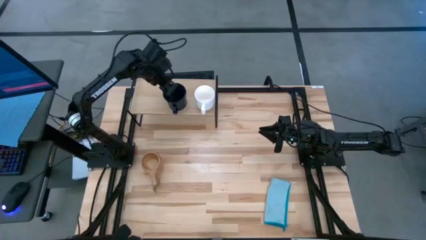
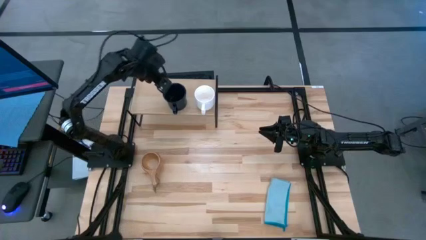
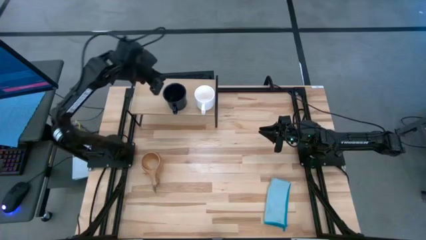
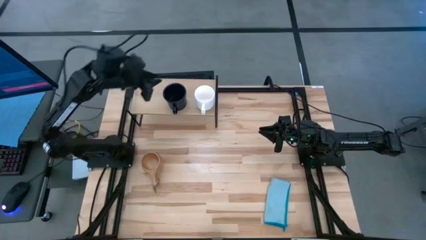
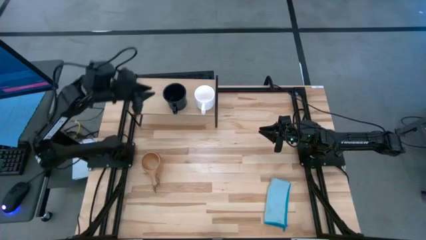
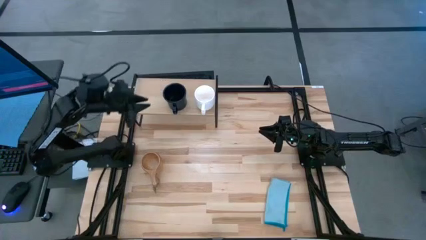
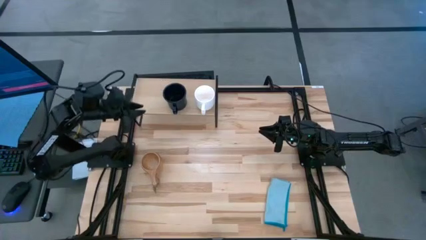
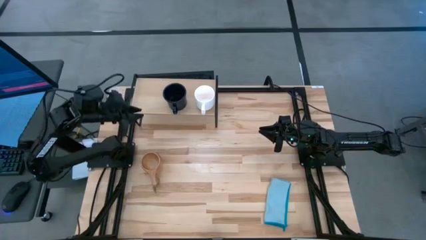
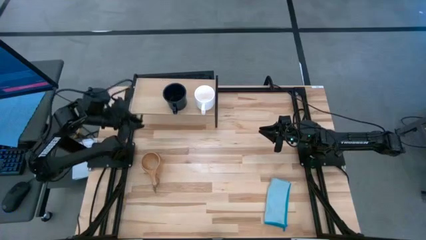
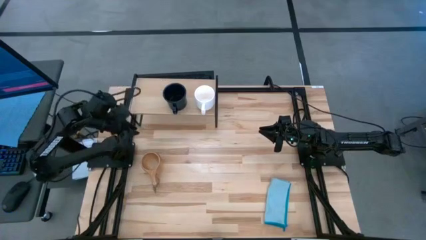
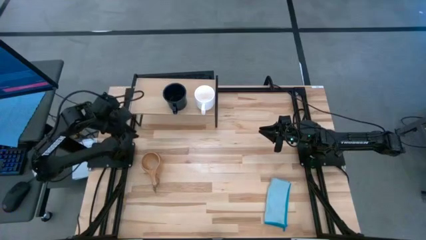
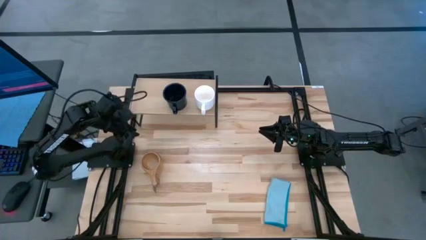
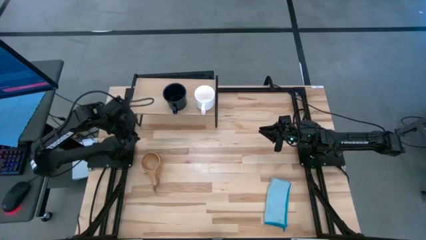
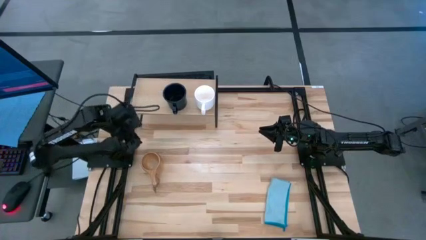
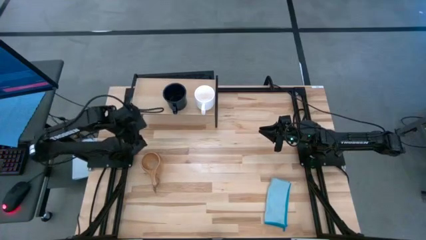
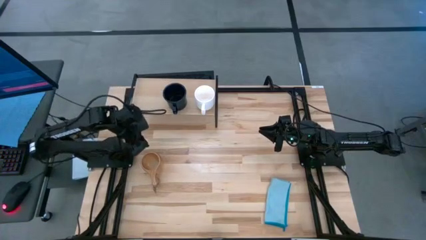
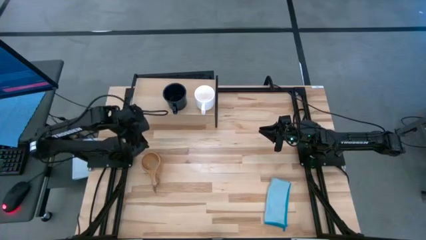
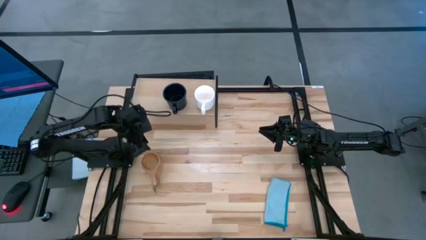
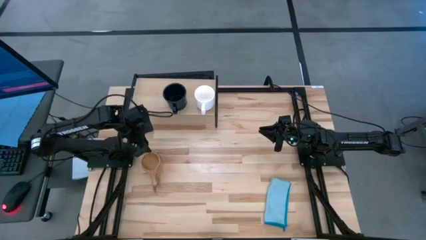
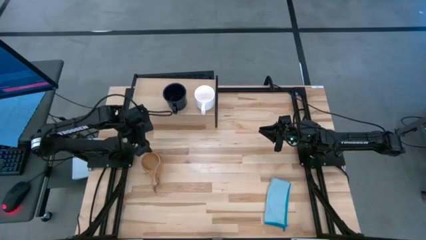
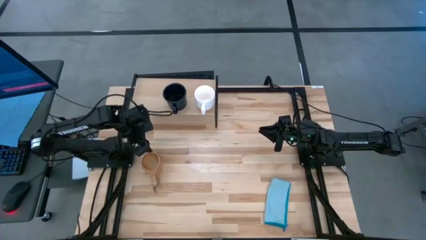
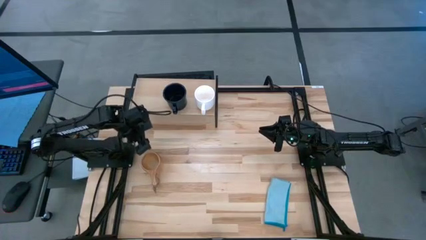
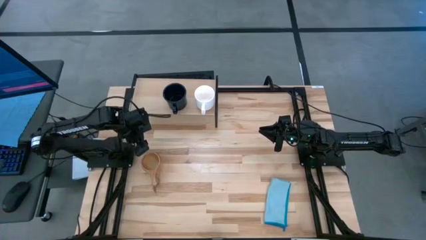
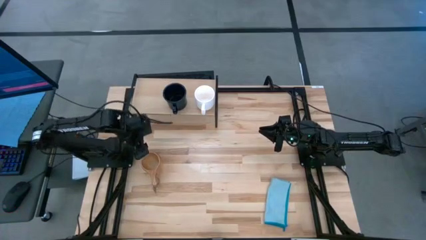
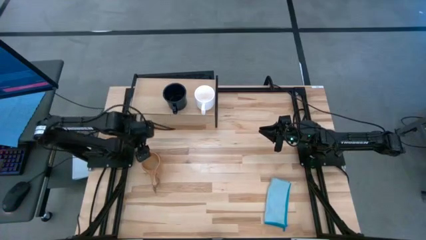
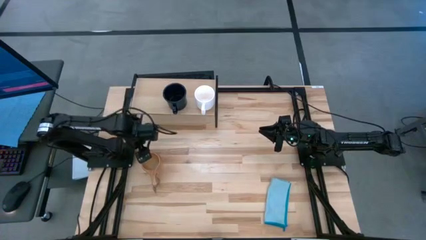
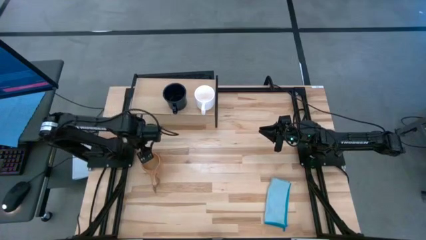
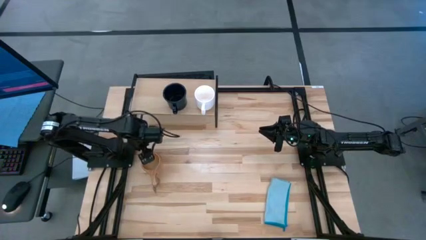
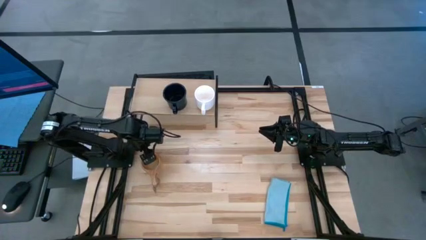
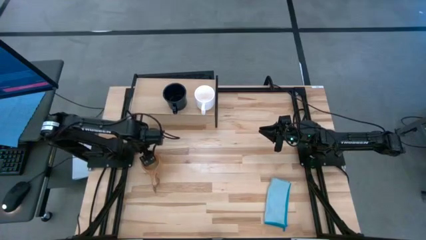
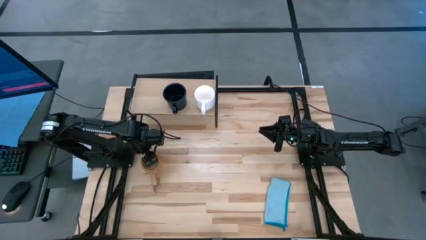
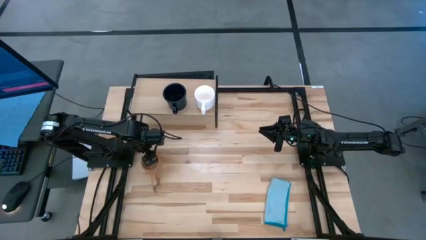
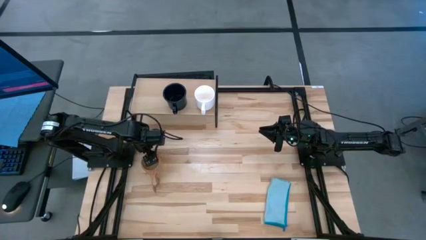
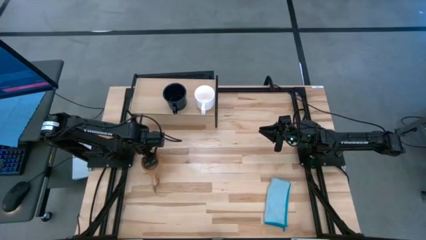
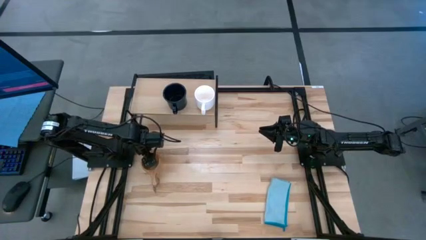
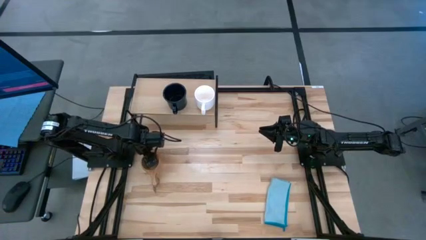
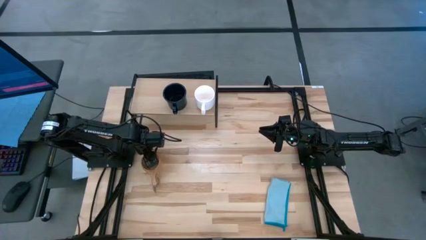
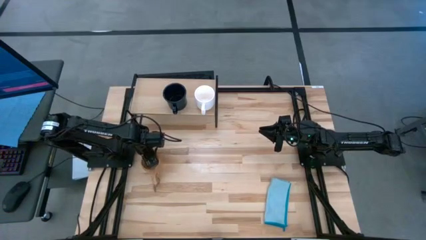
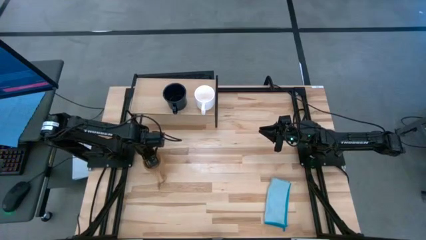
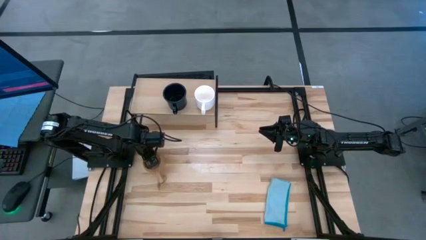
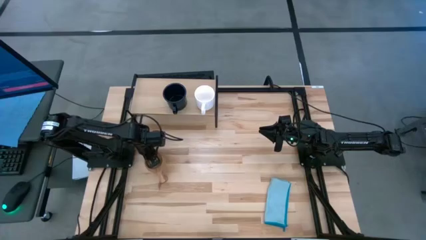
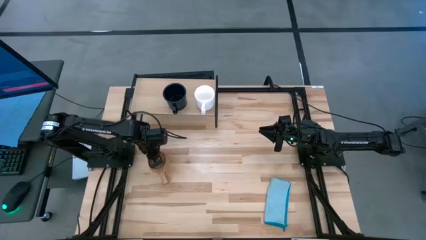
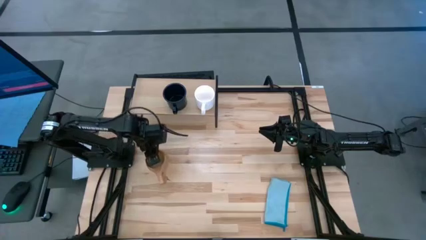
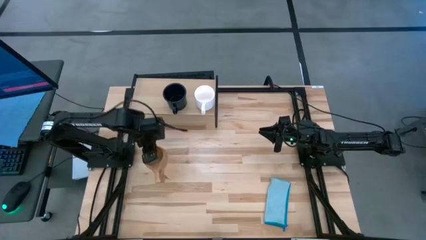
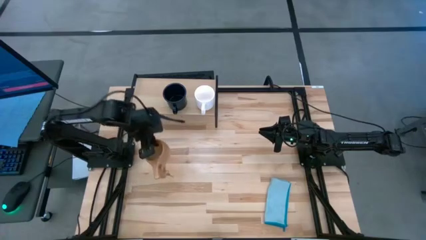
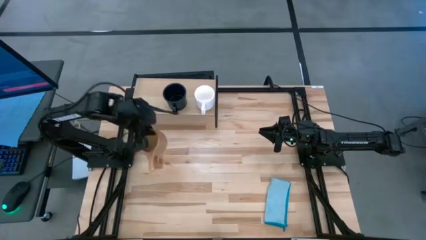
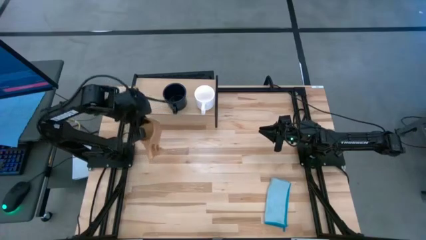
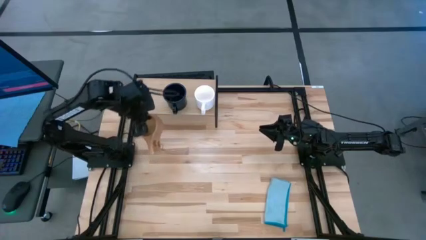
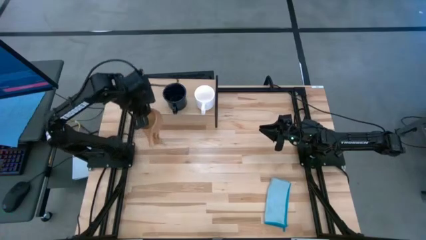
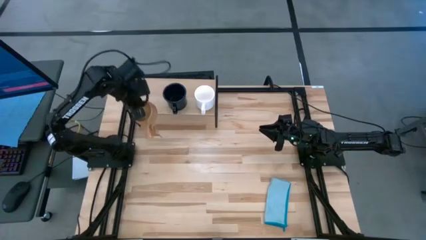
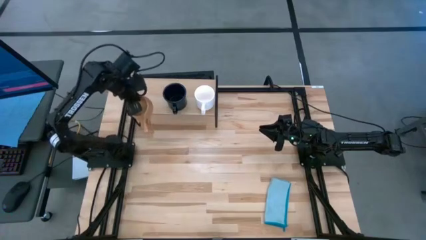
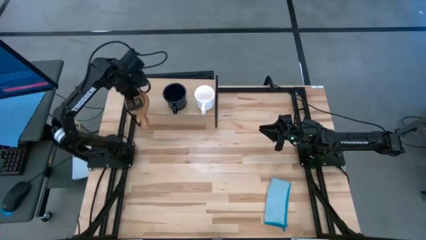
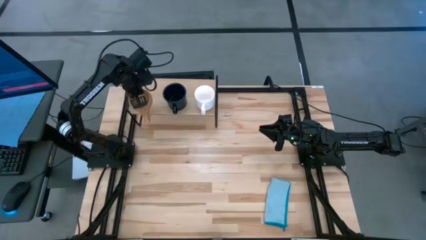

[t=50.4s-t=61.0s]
Task: Stack small to large cups/mugs on shelf
Put the brown mug on the shelf

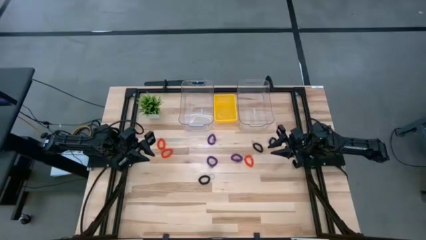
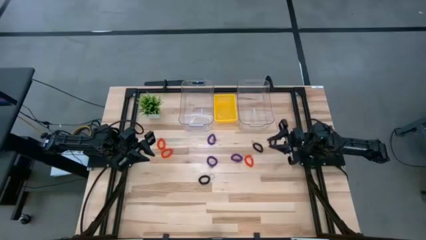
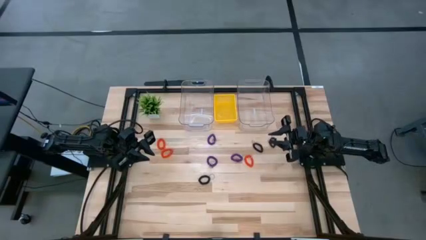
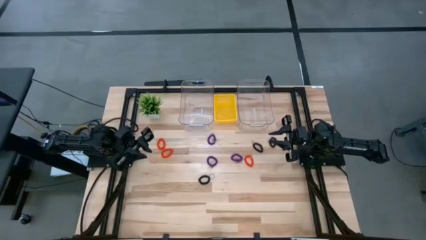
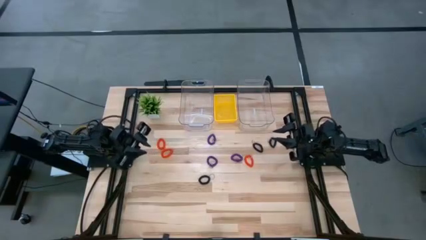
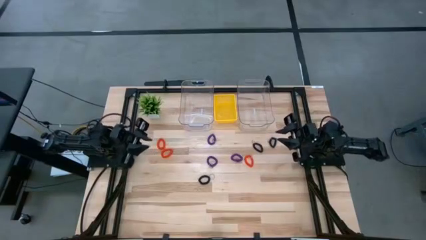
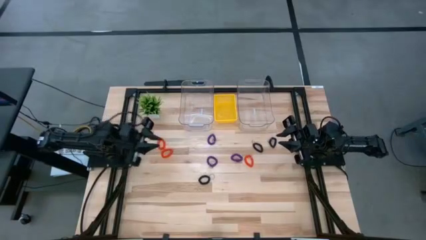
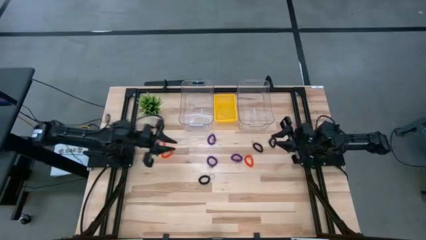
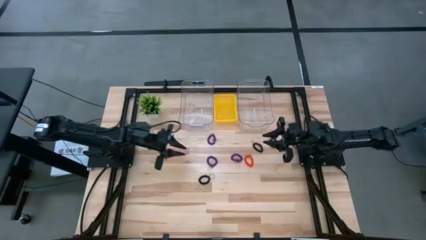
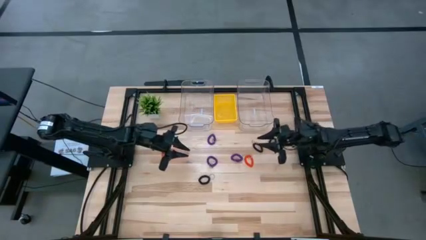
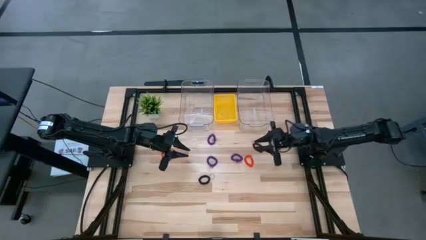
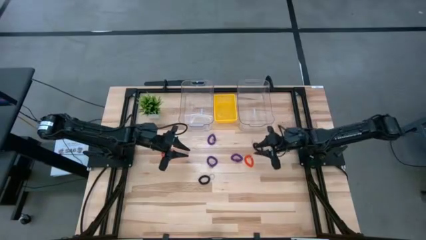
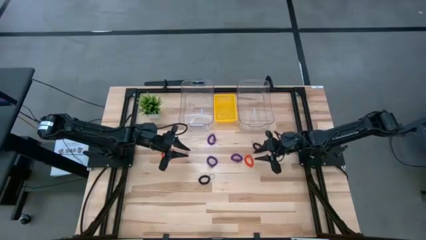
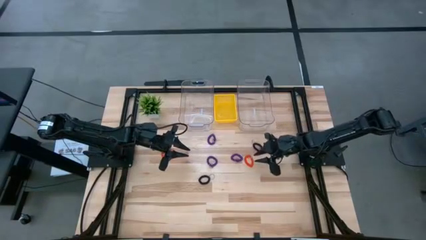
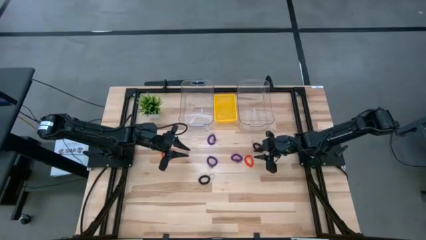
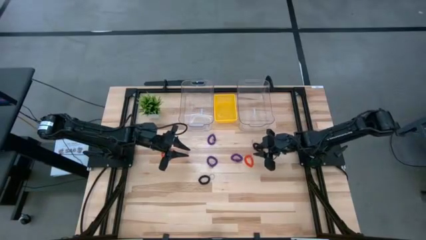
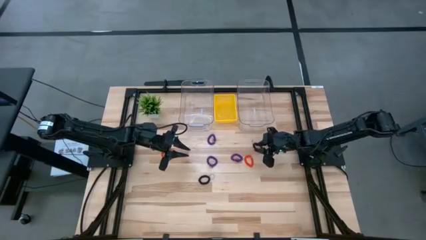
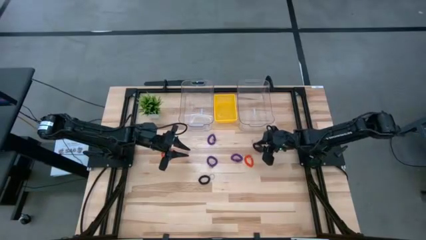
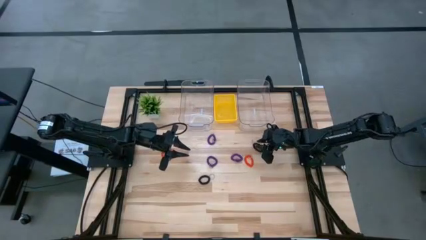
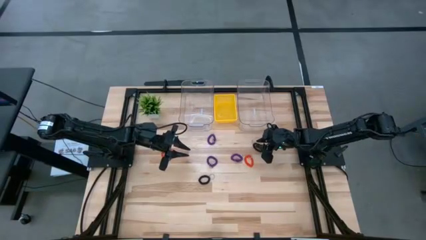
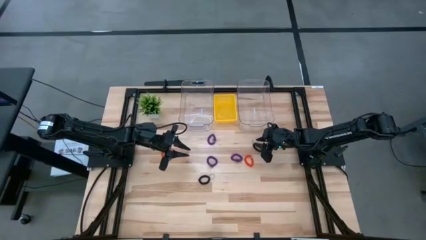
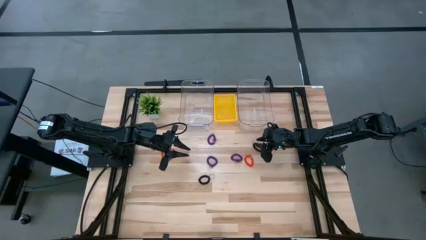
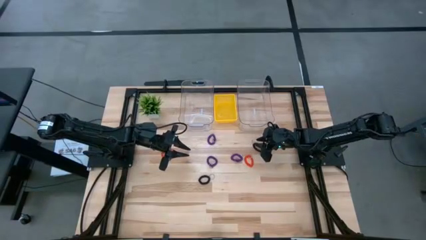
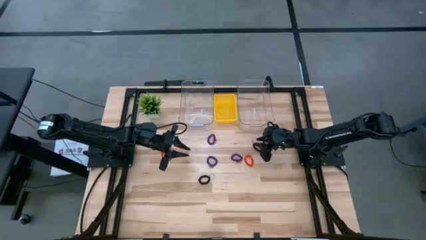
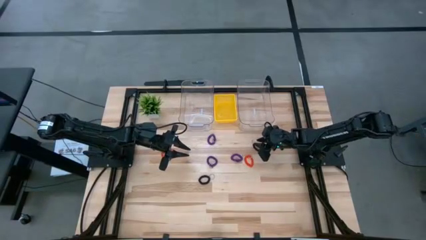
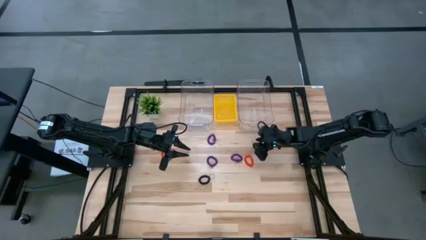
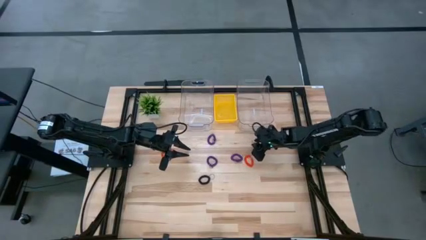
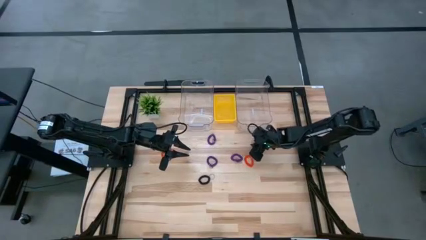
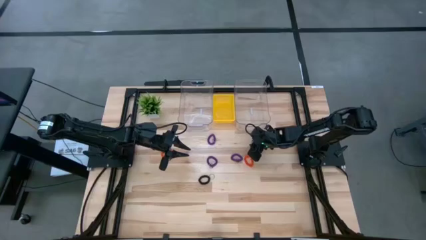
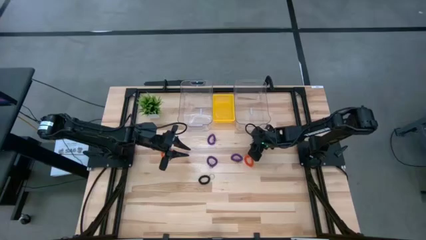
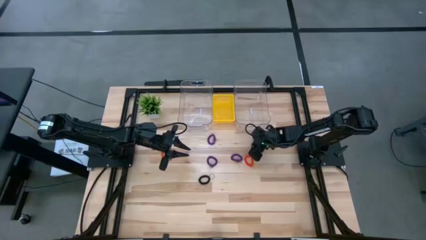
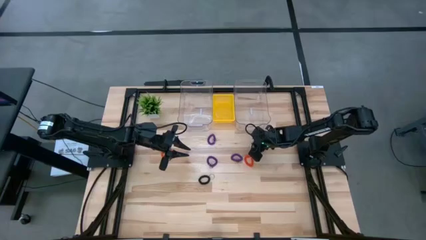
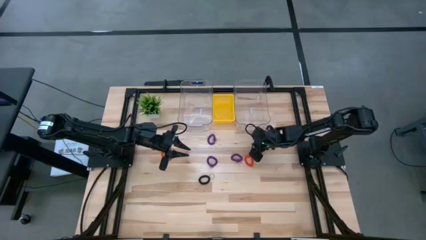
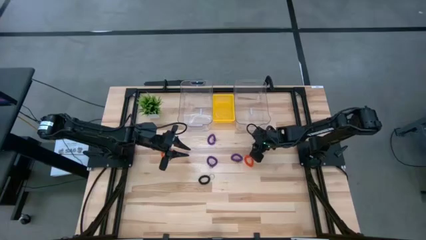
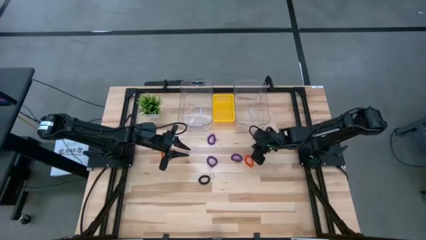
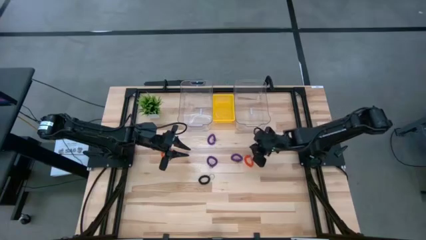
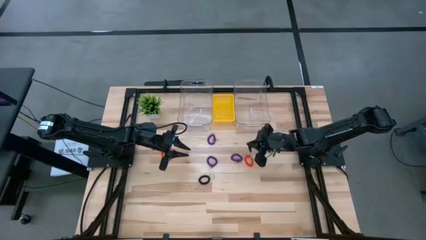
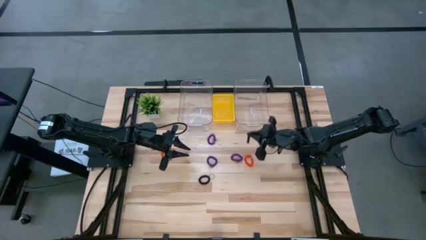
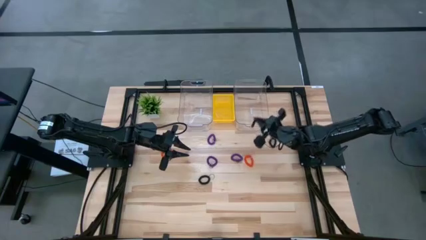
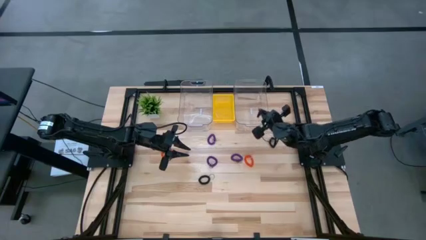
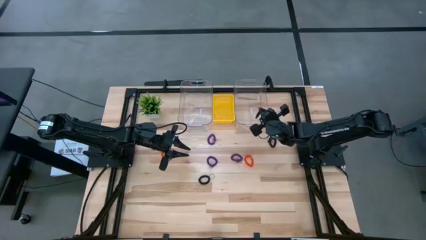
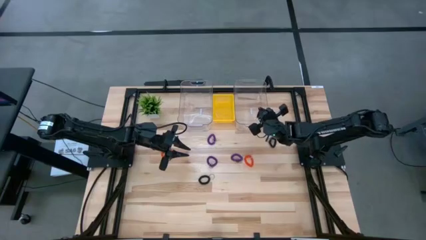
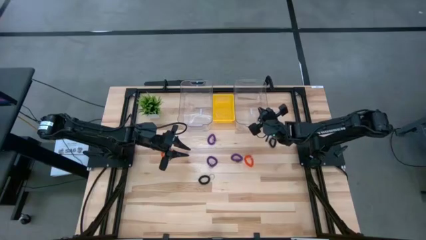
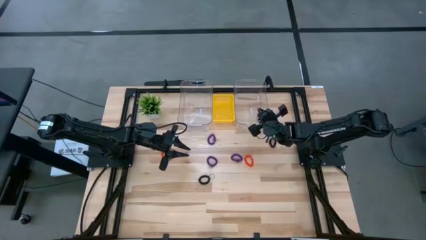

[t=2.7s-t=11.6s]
Task: Sort spring keychains
Put the middle black spring keychain into the right transparent bin
